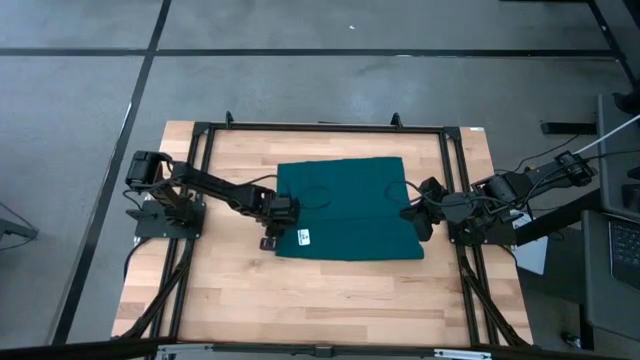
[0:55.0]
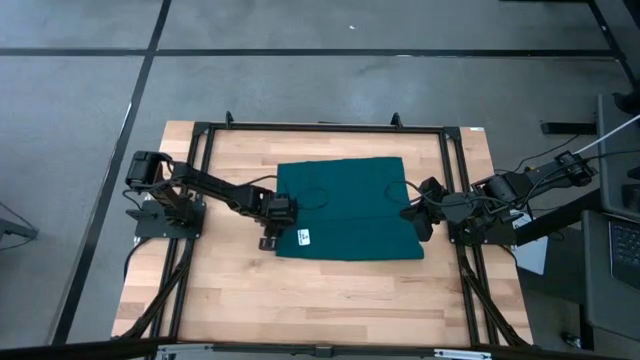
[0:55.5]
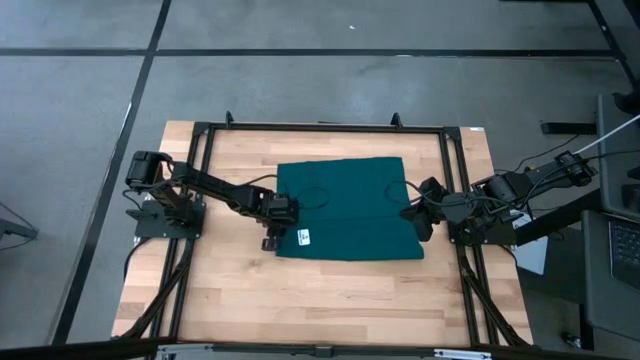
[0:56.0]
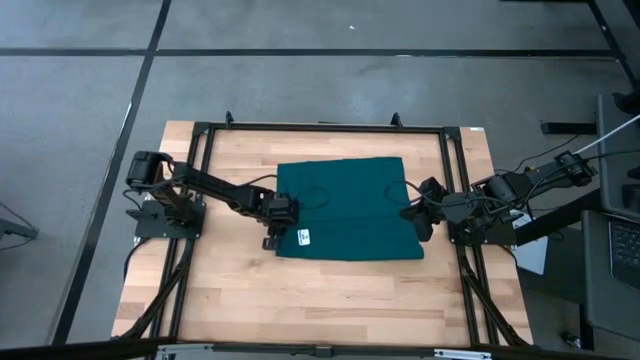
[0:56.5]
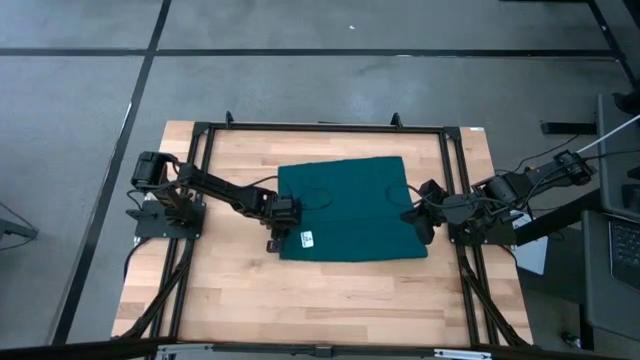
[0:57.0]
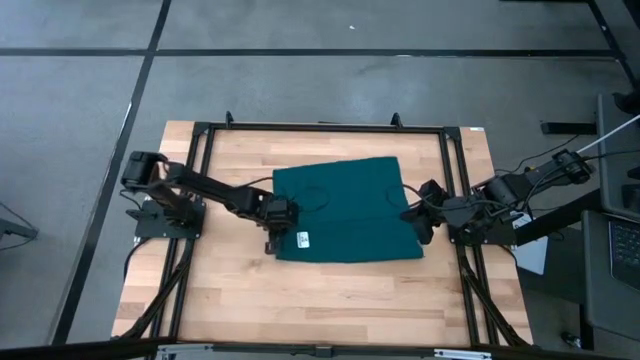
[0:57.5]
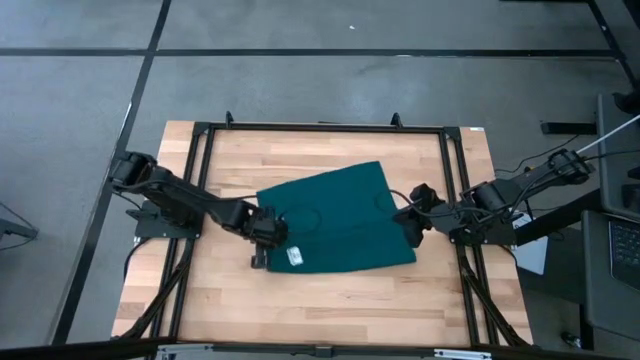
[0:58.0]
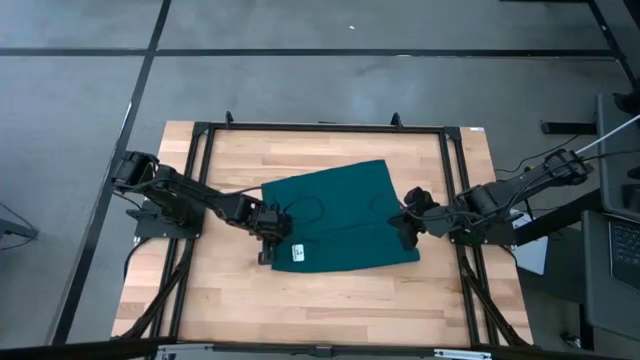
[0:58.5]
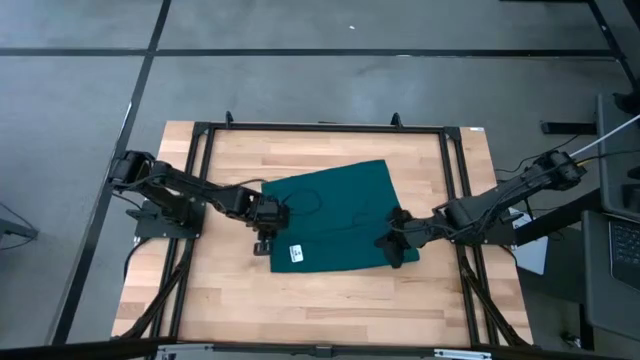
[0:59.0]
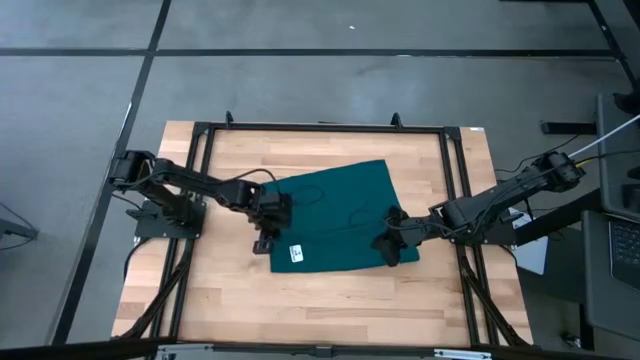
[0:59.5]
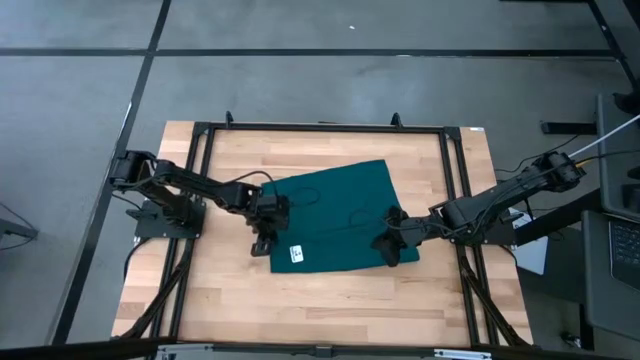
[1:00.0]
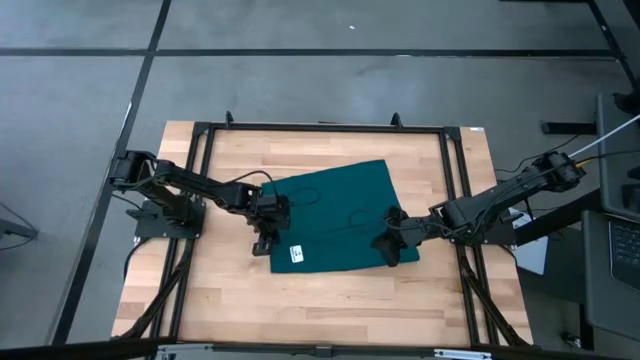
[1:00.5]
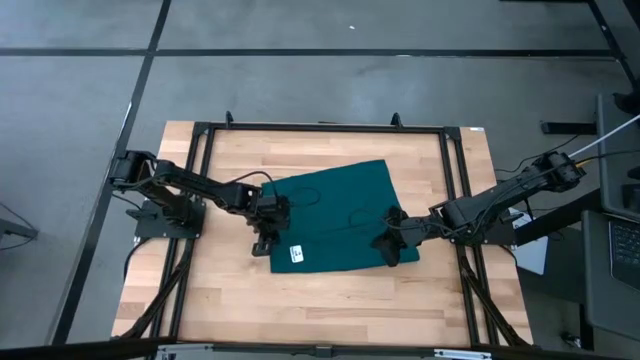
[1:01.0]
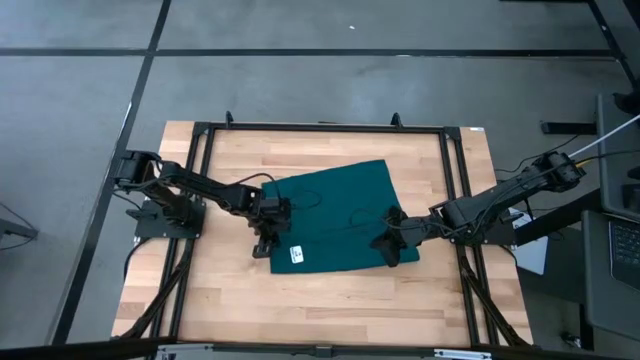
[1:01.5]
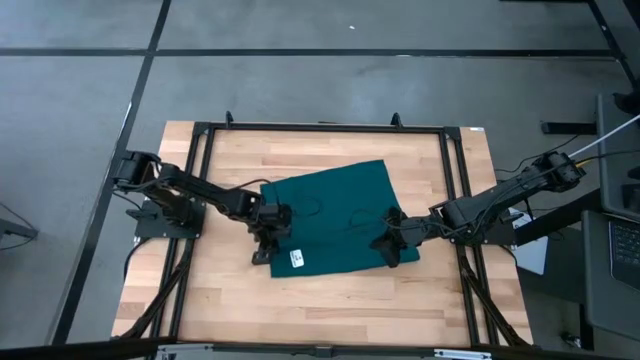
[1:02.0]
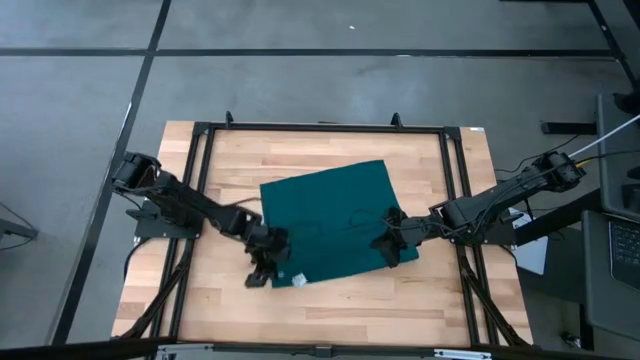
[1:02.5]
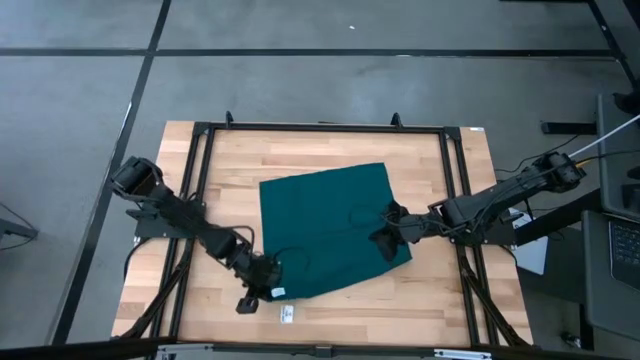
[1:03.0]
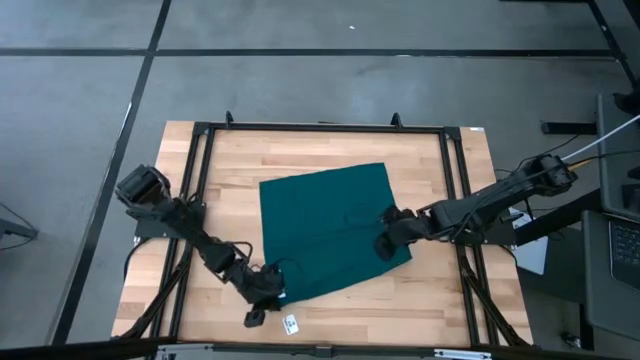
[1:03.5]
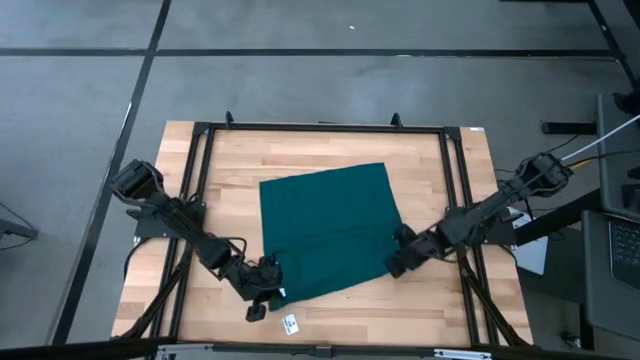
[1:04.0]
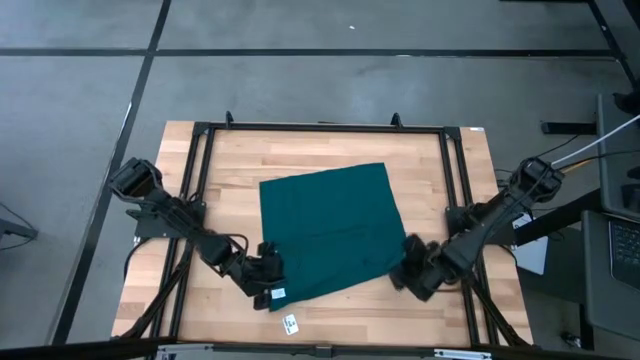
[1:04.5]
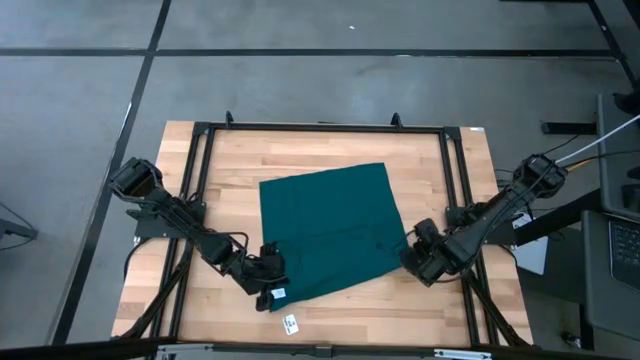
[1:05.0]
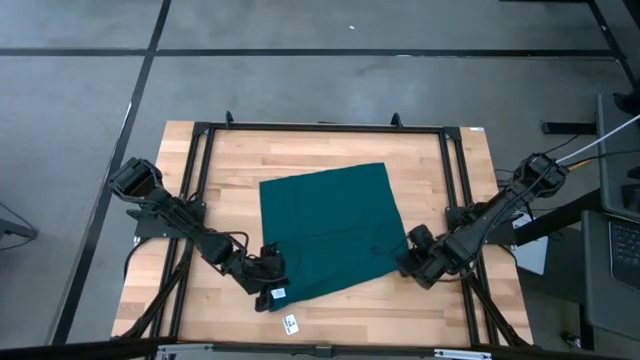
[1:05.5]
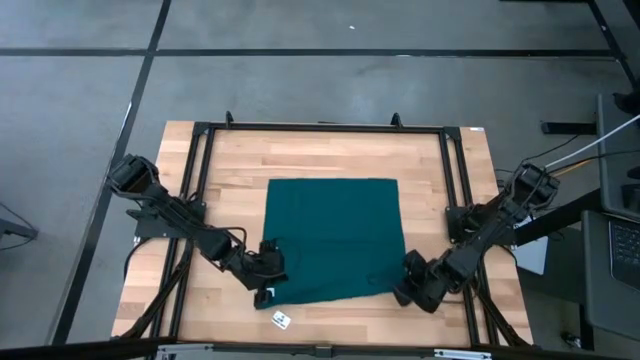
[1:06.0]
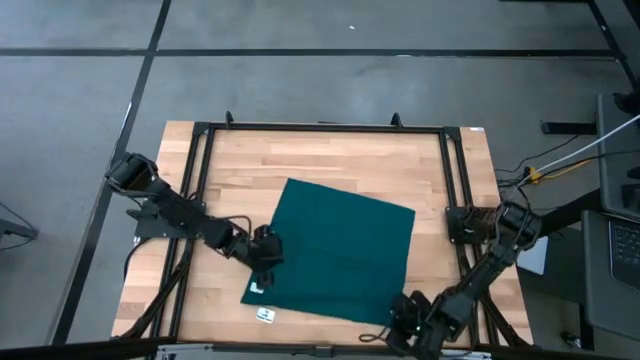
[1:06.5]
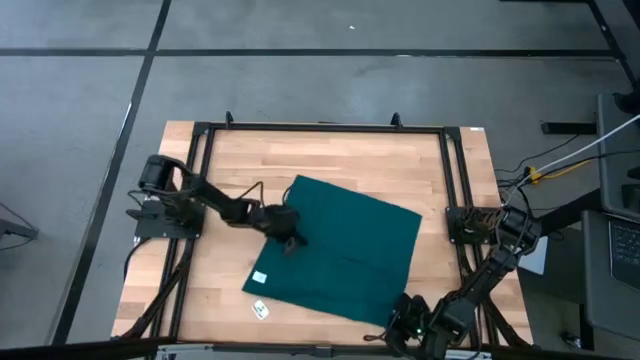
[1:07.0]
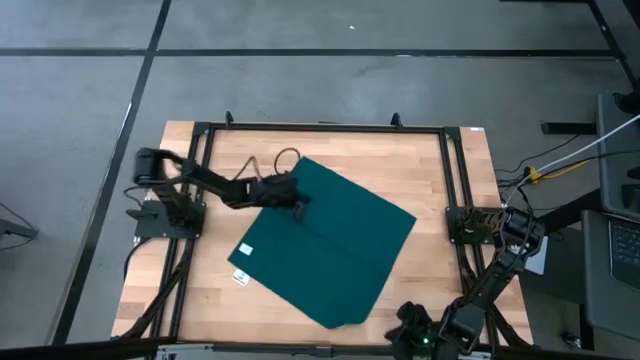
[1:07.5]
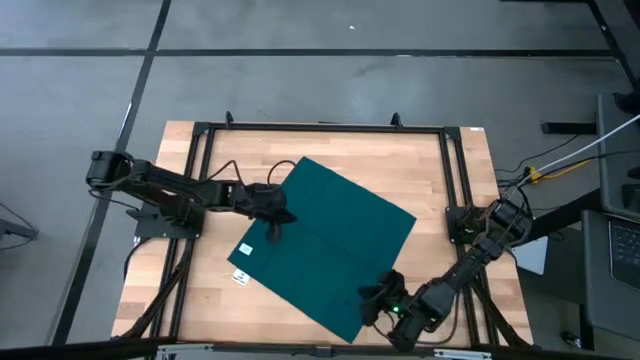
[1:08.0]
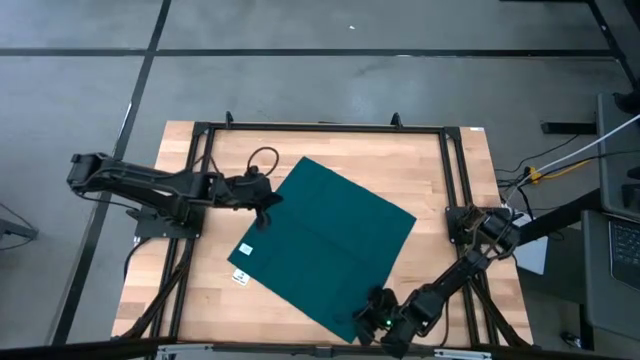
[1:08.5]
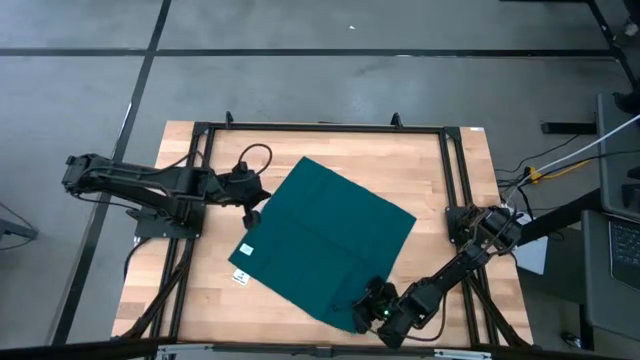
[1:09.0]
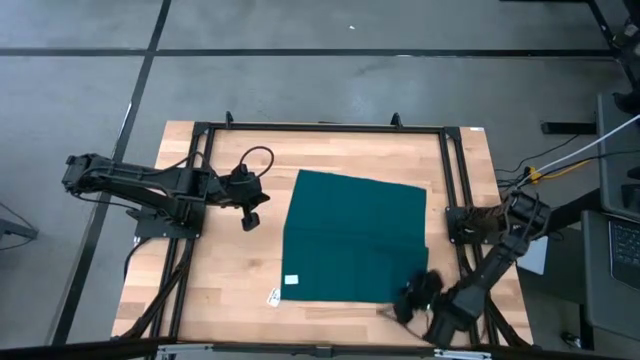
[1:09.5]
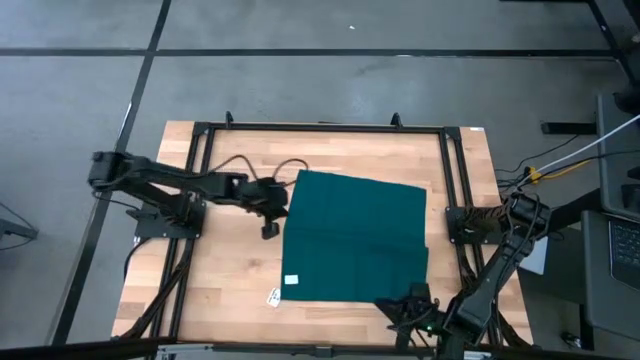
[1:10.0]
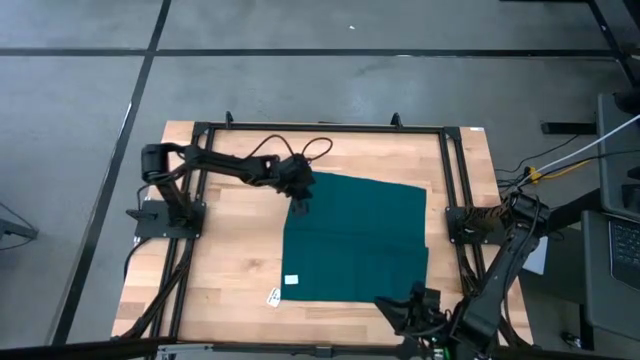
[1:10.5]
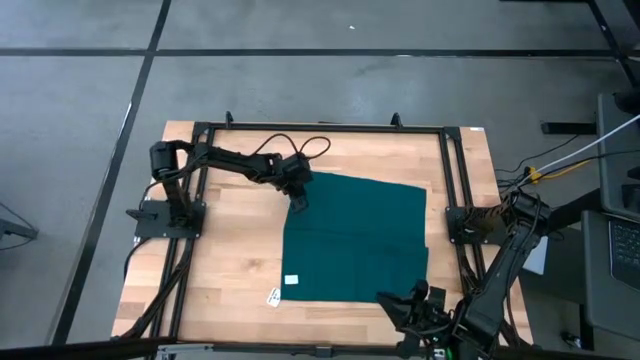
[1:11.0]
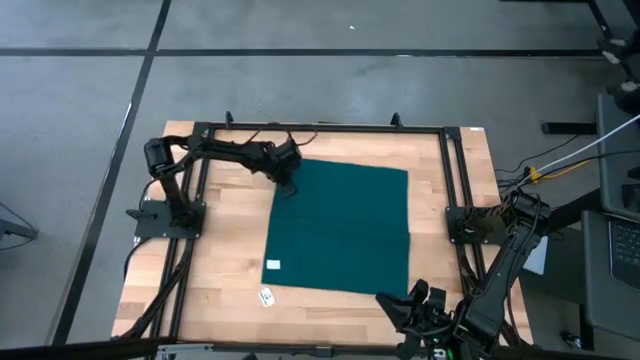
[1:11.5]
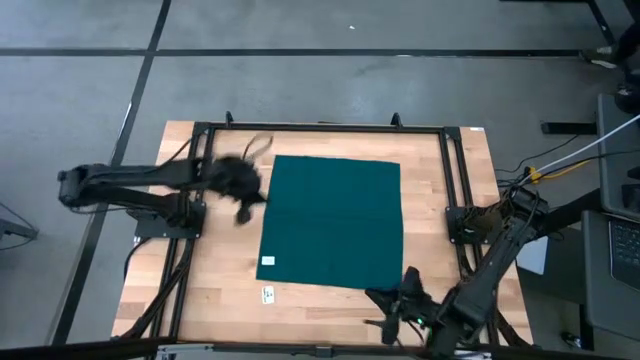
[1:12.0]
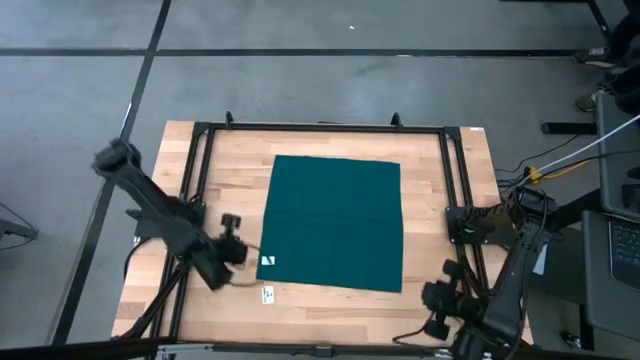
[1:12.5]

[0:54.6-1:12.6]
Task: Fold microfiber towels
Fold the green towel

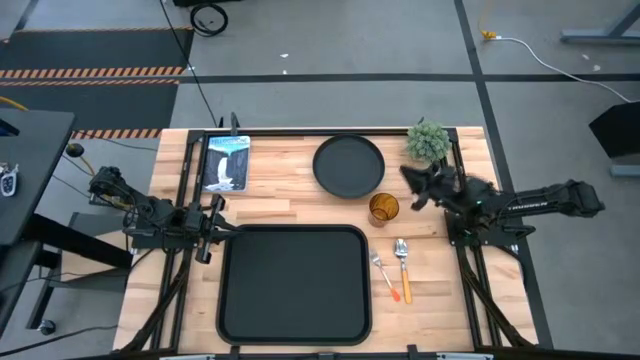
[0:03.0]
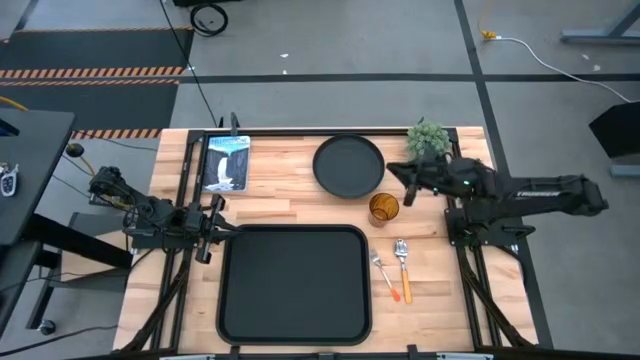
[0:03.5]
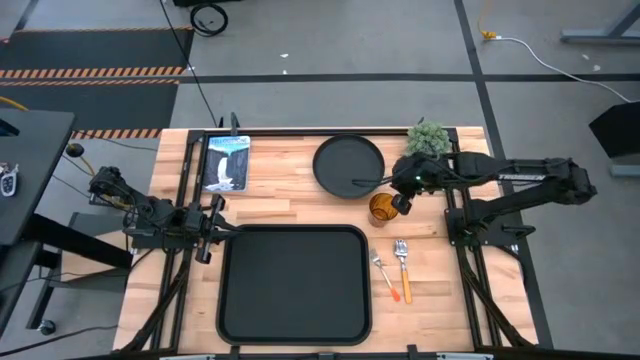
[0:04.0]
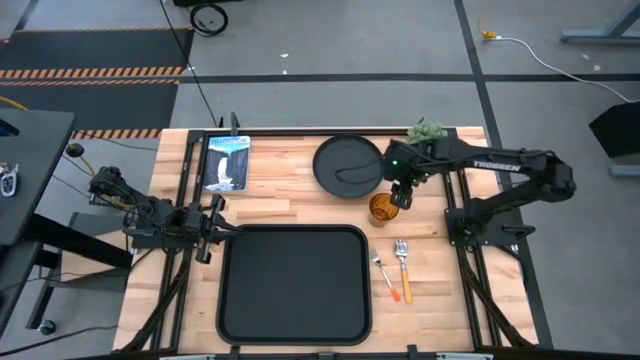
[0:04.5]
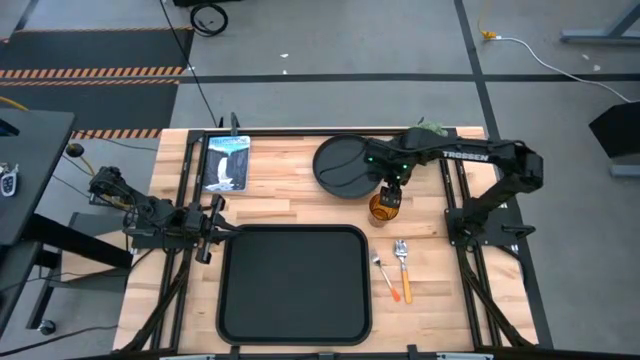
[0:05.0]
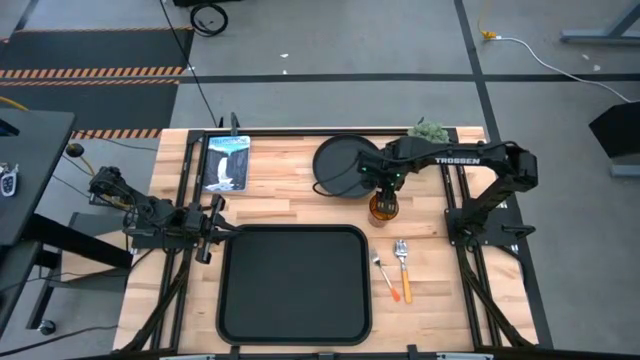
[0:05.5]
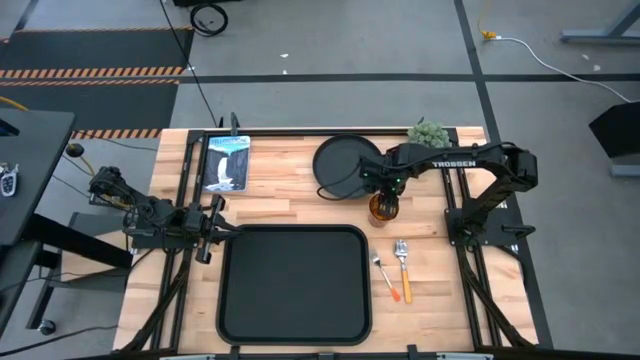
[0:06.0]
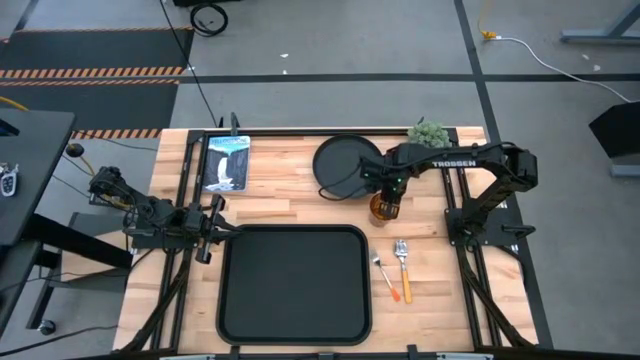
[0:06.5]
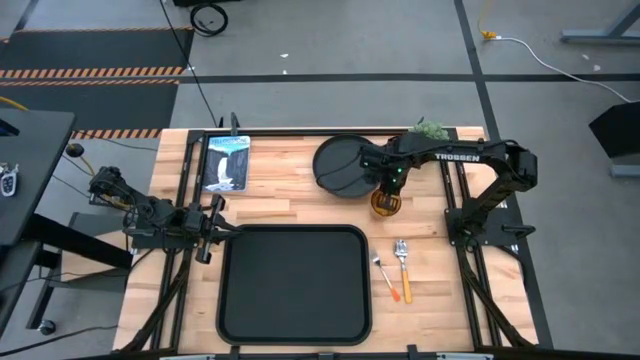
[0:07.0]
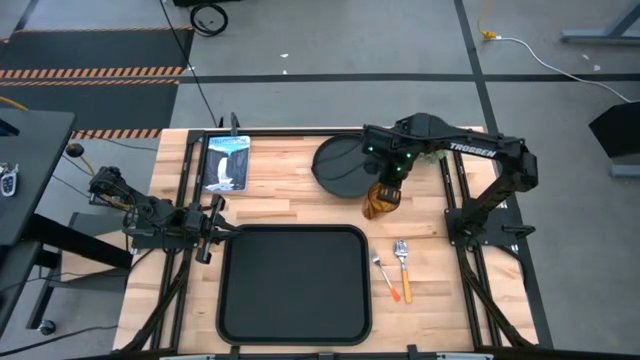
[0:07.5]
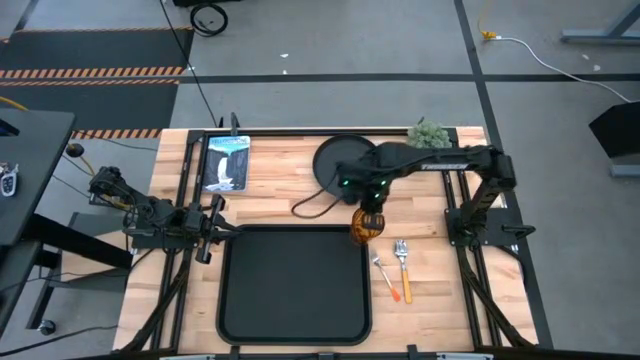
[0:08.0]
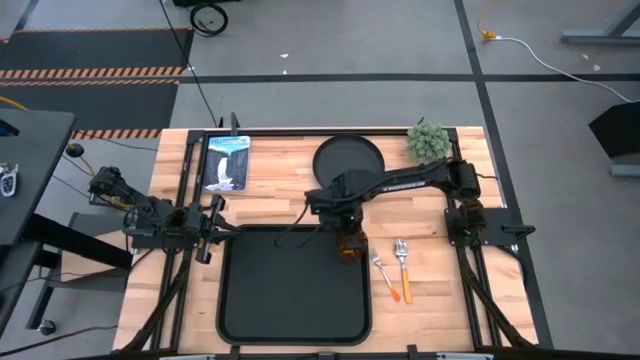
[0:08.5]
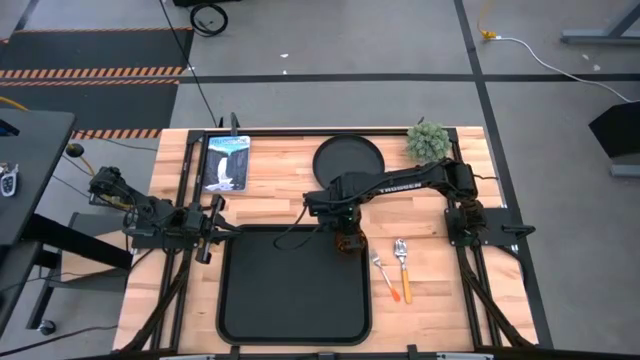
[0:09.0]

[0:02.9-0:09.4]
Task: Pick and place plate/cup/fork/spoon on tray
Put the orange cup on the black tray
